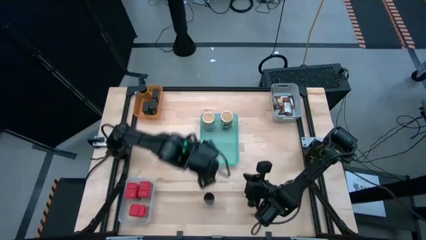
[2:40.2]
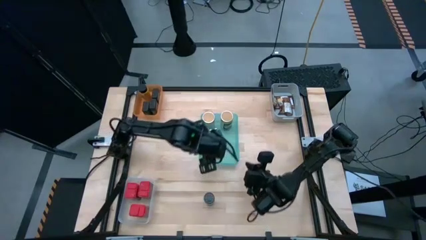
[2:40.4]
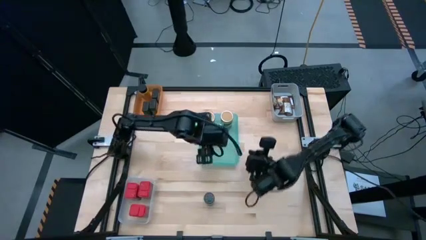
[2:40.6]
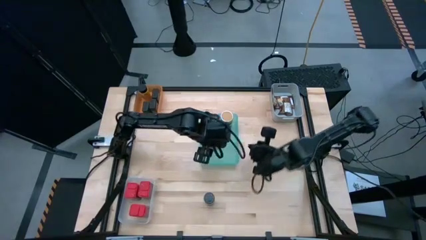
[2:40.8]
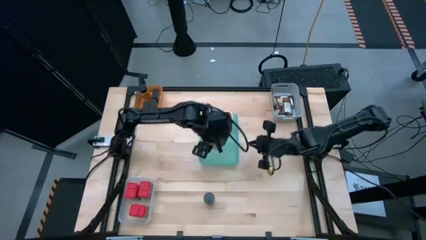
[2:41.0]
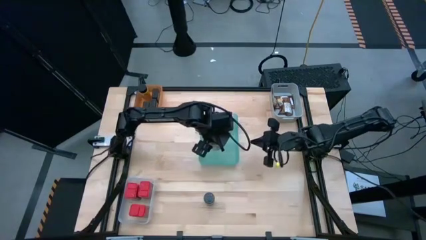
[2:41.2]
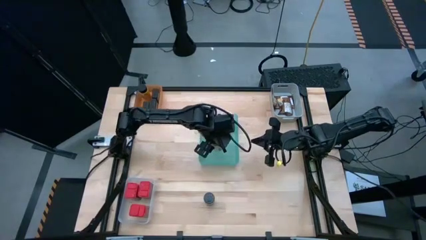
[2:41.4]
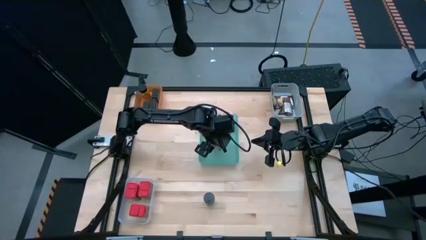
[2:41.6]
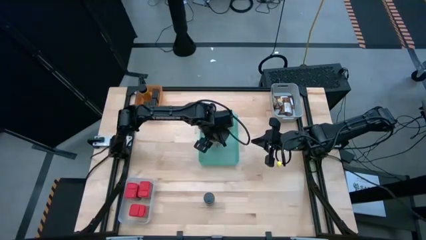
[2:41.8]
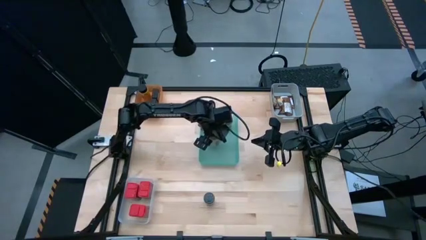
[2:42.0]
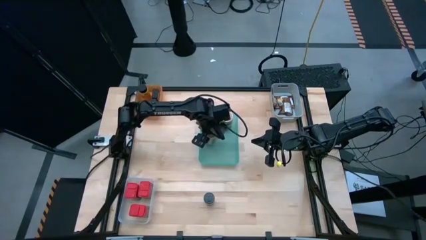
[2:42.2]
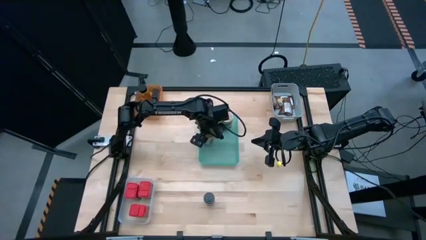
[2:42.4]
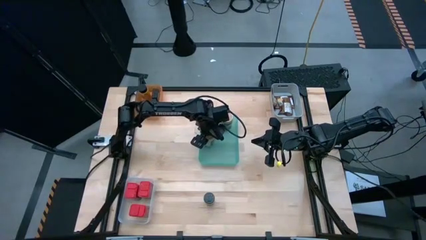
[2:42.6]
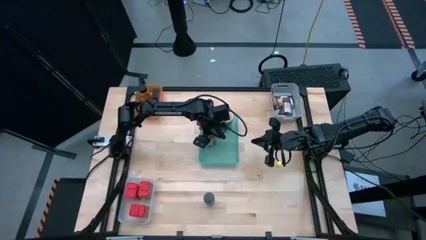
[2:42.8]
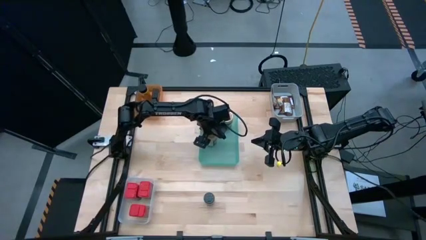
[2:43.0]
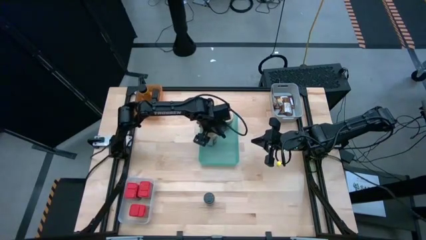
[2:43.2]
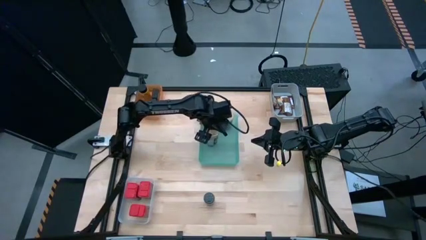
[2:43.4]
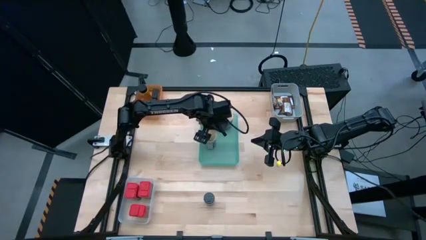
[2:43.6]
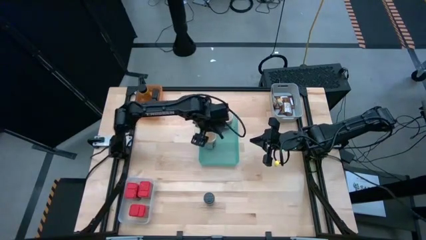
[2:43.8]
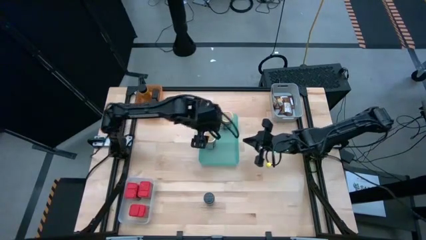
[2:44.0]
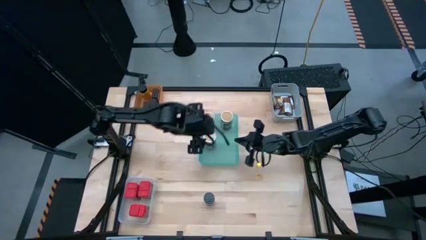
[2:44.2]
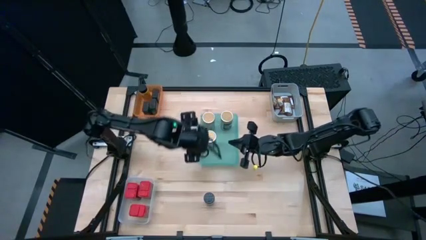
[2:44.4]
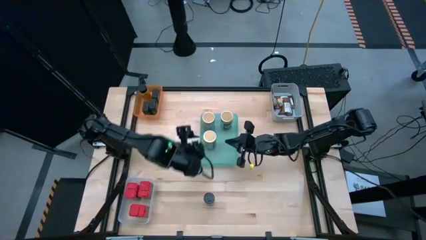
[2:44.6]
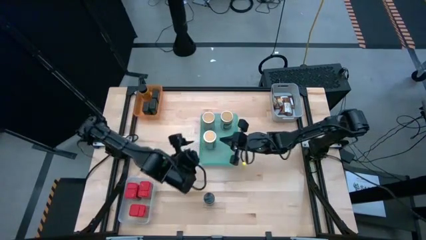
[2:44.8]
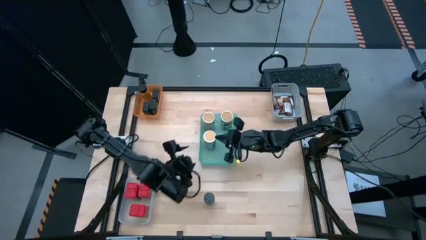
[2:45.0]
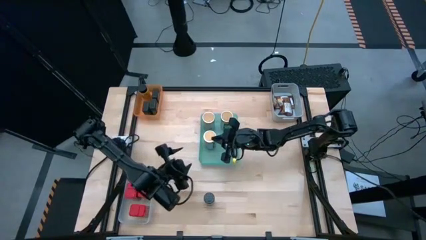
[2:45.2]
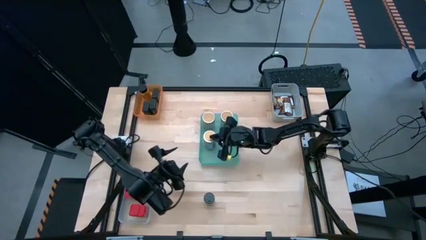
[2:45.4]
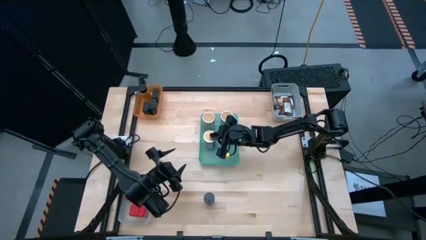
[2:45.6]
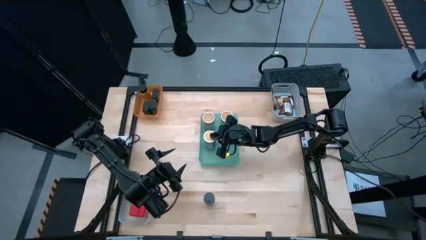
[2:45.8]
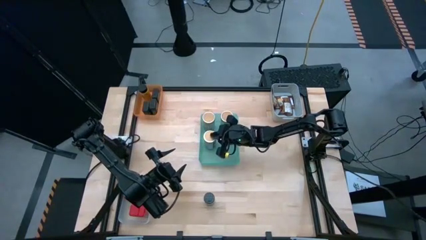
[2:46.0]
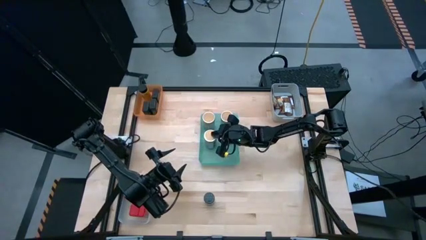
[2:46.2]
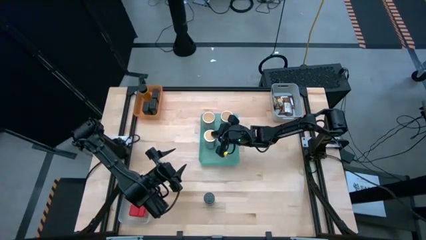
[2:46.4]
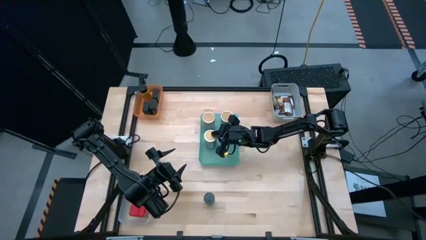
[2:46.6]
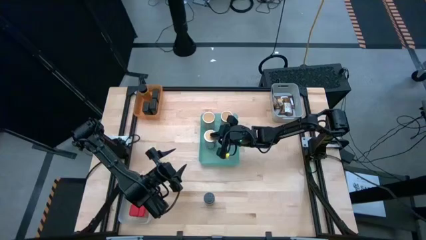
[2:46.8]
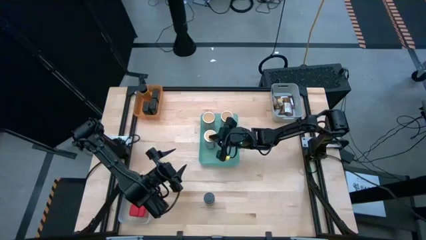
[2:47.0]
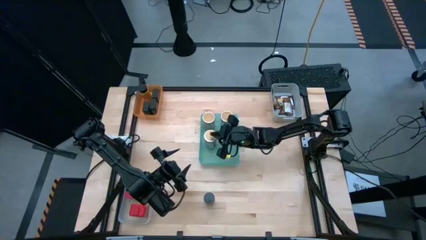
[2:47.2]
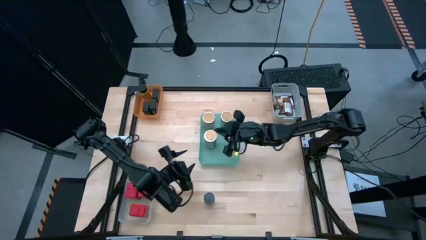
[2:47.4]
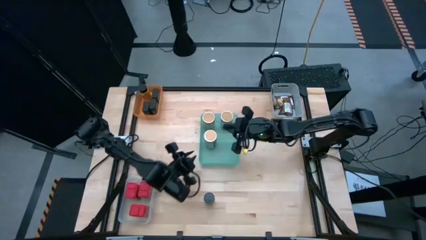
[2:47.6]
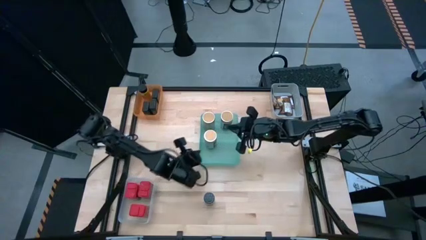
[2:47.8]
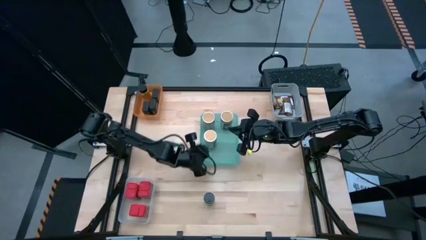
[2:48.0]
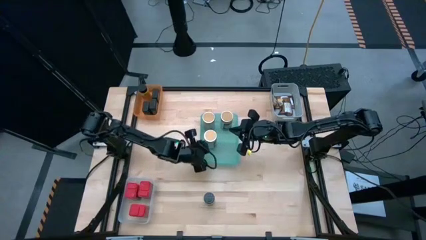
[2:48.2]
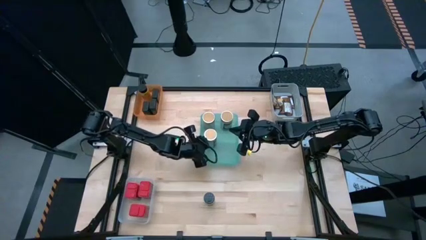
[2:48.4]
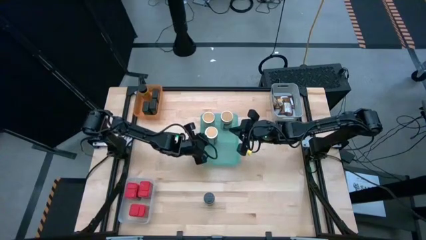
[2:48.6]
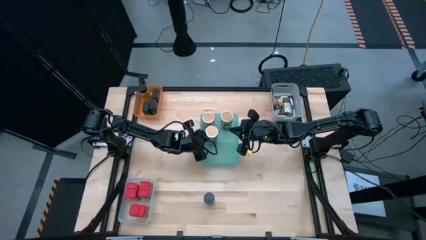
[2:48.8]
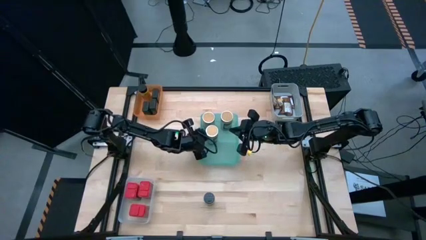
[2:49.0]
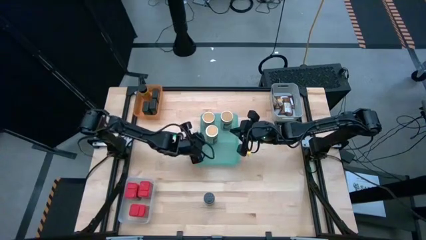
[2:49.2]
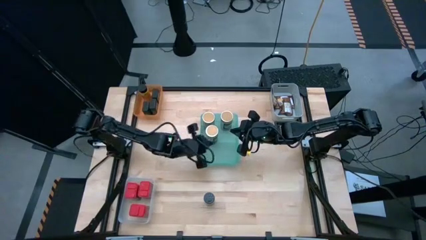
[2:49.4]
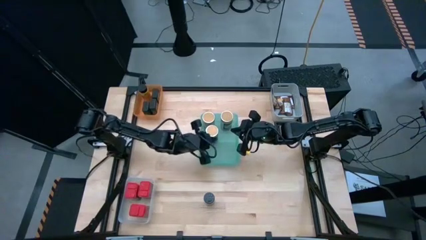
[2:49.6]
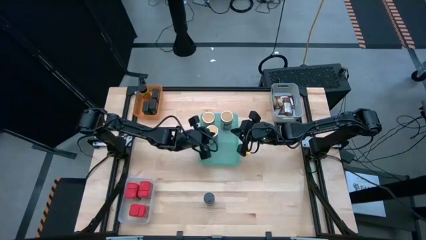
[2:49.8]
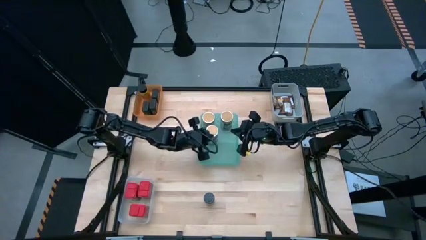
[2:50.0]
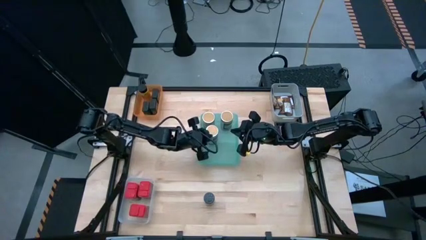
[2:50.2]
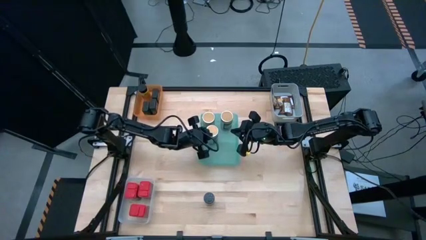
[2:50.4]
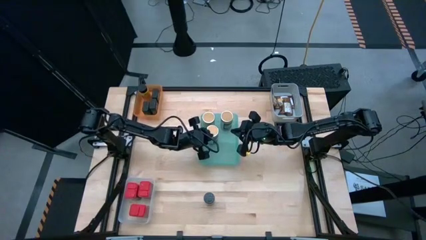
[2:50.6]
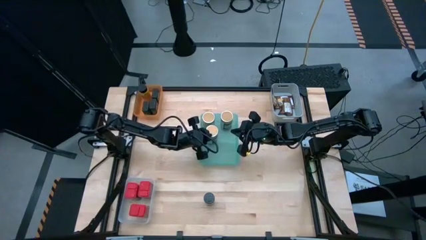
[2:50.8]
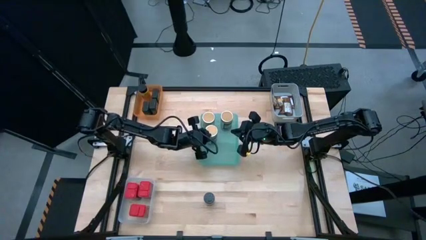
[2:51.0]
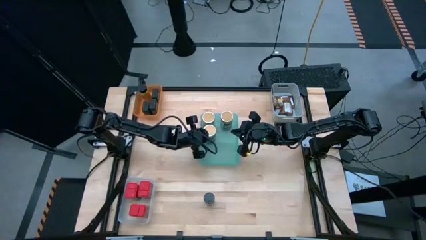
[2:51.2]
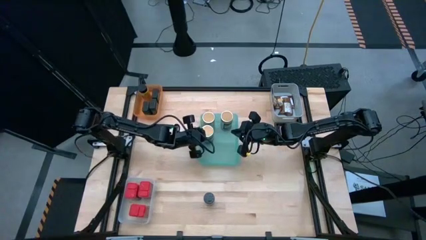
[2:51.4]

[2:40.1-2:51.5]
Task: Sort spices by type
Put the brown seasoning bottle into the green bin
